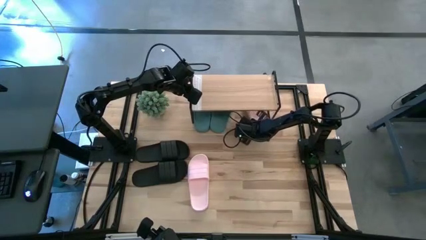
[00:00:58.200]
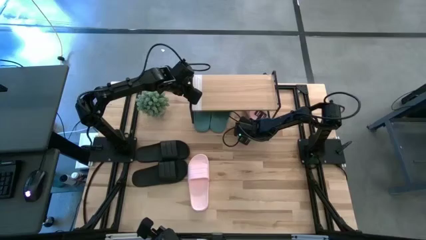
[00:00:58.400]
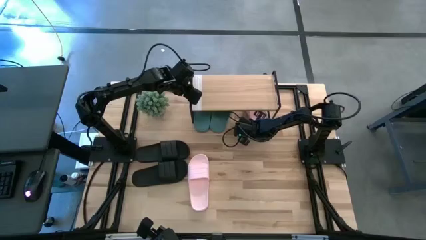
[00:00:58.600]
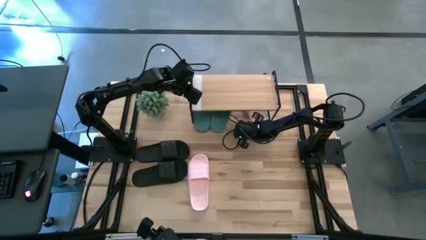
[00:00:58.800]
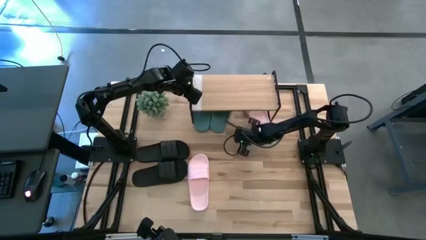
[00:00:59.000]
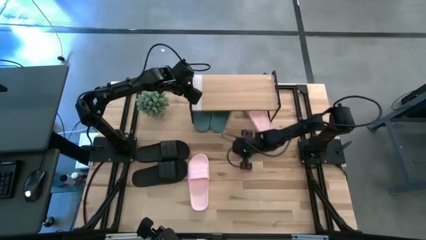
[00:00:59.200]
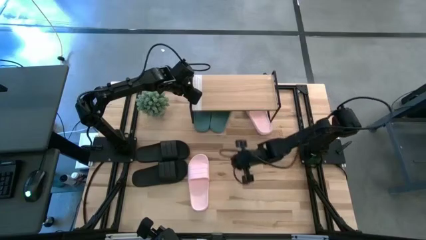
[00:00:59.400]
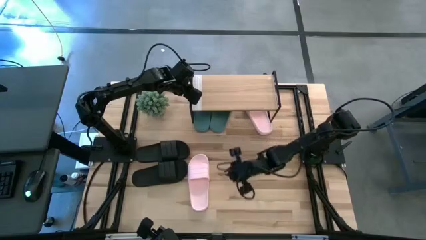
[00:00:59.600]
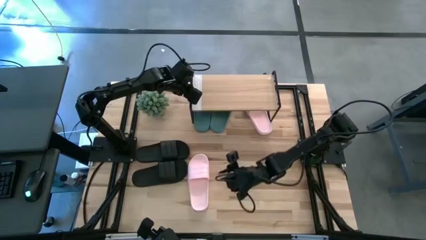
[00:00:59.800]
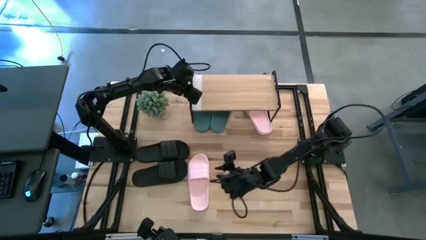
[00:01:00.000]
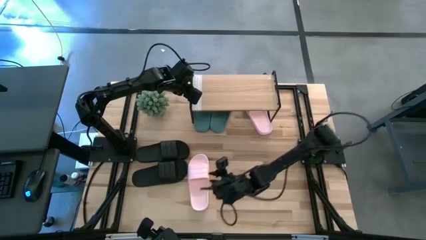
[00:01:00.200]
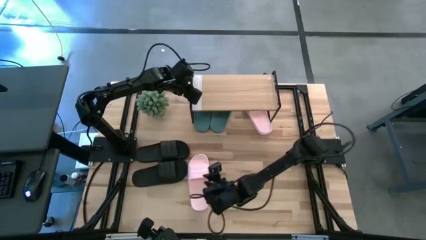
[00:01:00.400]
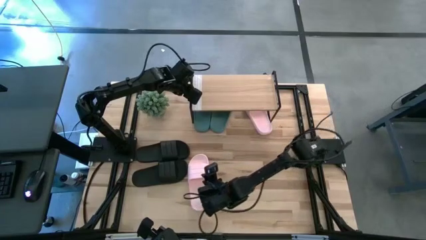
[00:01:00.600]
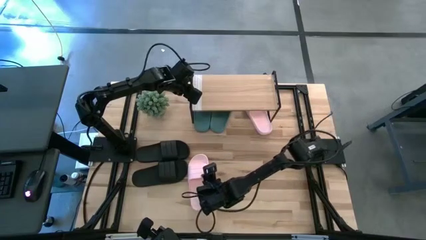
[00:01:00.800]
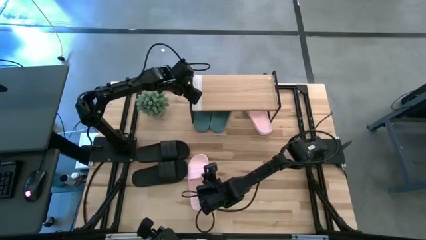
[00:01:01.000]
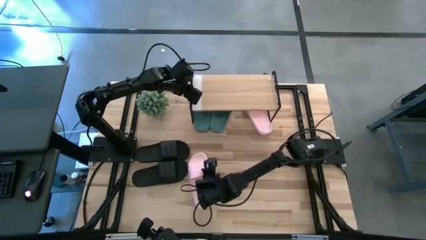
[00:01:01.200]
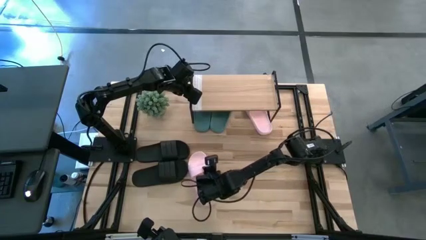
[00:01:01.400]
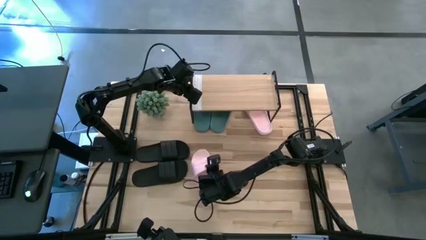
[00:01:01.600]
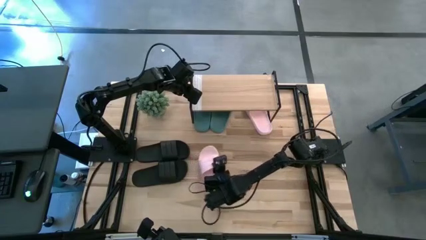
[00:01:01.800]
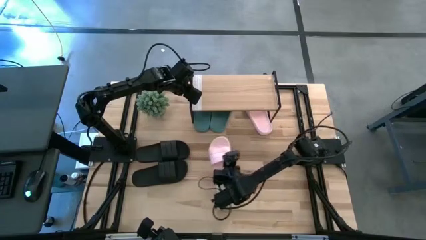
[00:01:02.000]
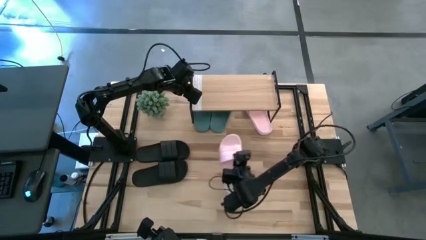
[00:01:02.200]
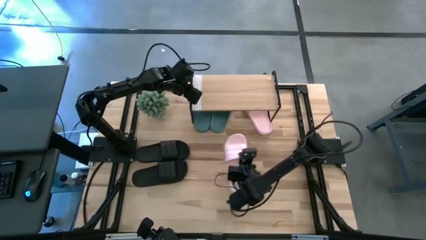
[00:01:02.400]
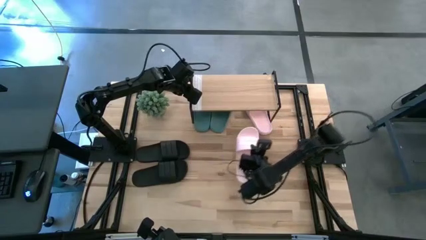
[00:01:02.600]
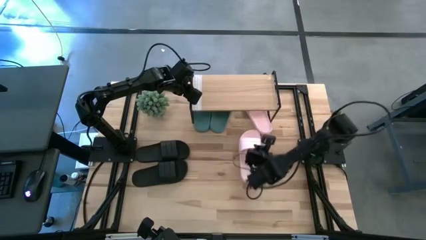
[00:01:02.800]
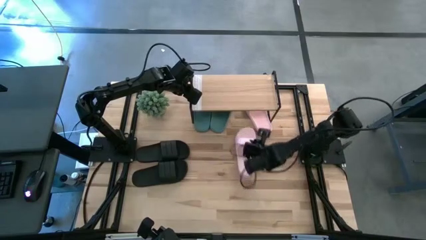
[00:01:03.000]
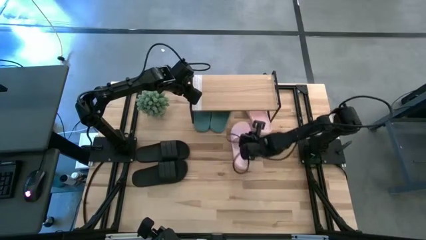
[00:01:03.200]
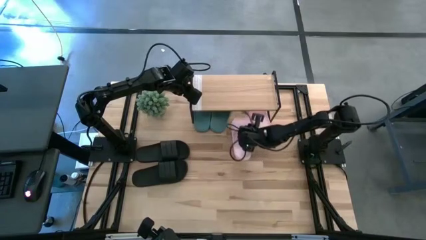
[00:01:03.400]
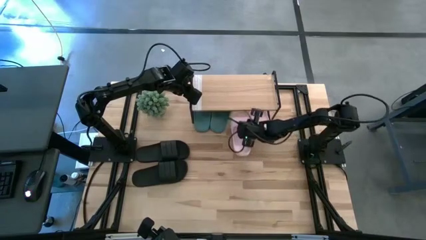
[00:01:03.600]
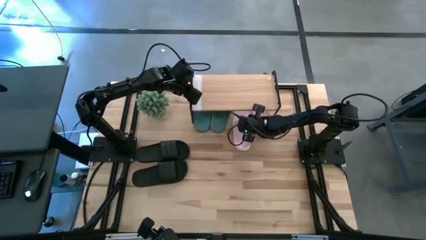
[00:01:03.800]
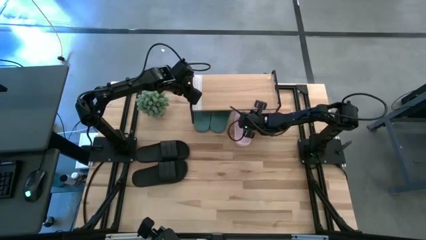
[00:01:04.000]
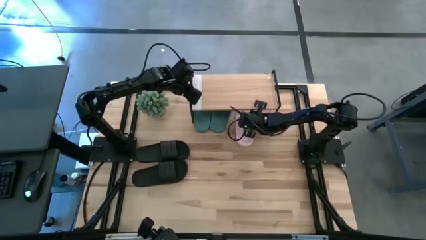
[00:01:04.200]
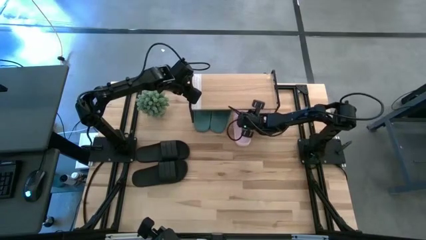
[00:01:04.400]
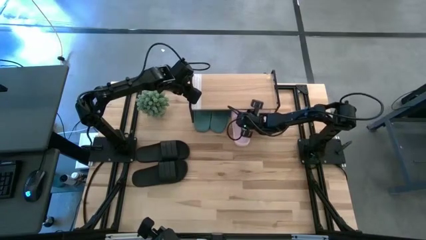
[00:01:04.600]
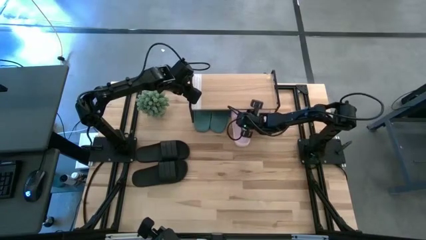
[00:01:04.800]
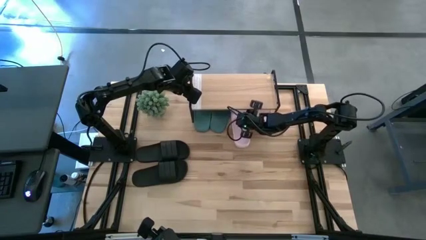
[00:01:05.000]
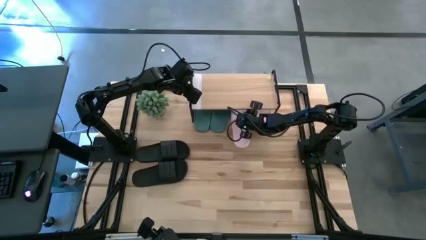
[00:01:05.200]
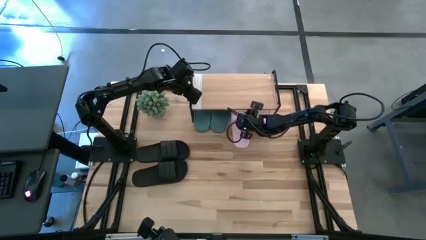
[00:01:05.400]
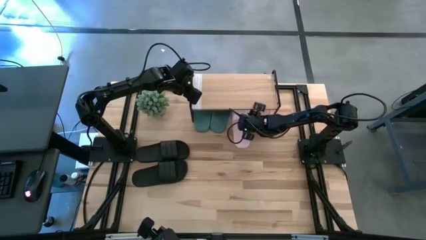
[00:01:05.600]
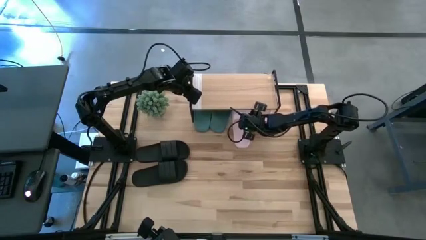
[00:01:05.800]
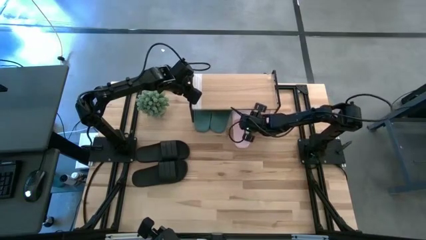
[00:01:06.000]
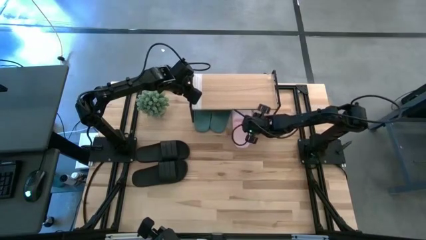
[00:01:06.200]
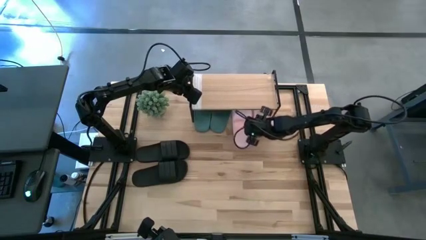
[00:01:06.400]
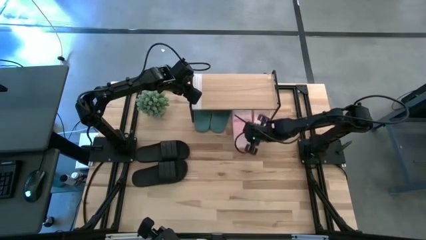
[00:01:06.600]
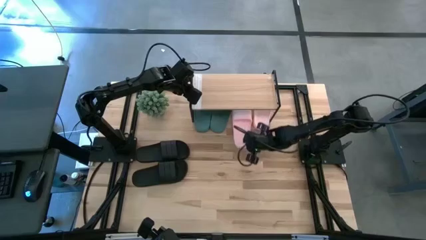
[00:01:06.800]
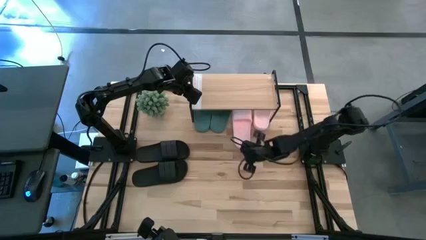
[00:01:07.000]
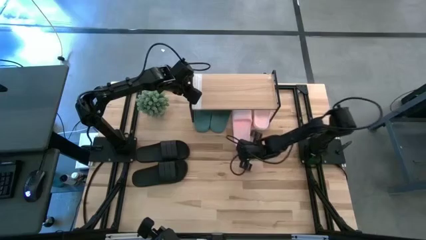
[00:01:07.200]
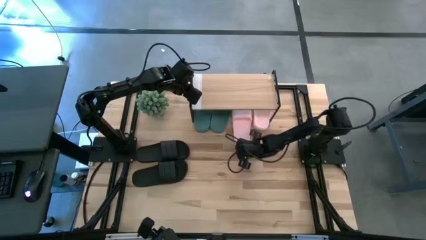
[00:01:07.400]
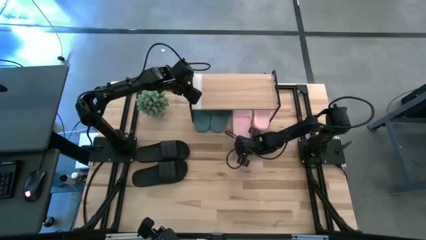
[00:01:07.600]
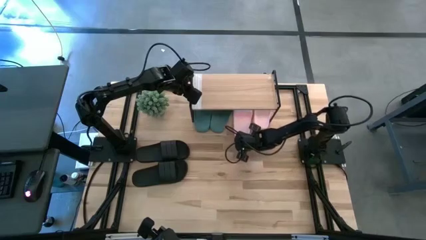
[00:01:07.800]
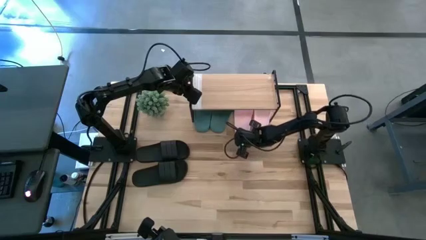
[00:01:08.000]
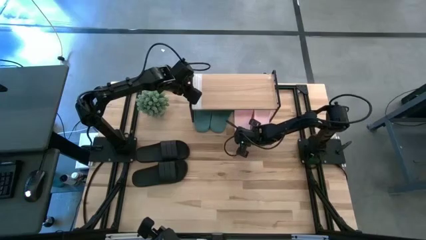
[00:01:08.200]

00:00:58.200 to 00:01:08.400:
Task: Pick and place slides into the shelf
Put the pink slides under the shelf
